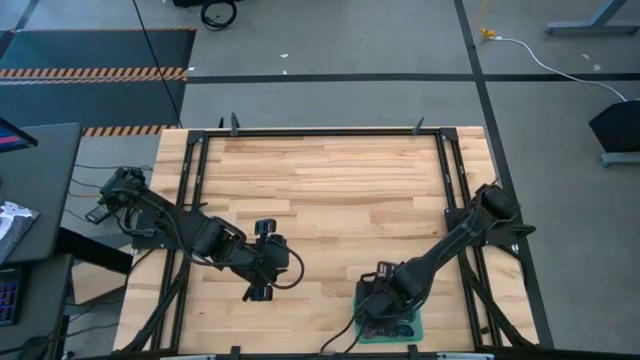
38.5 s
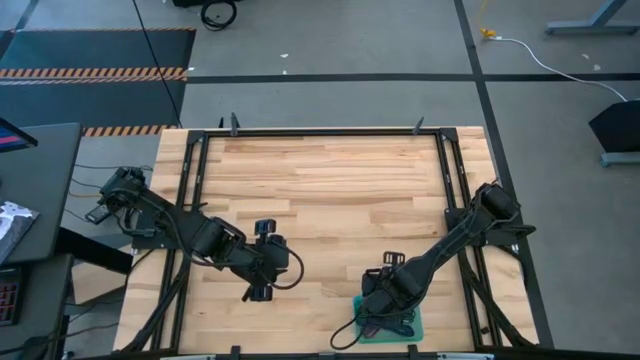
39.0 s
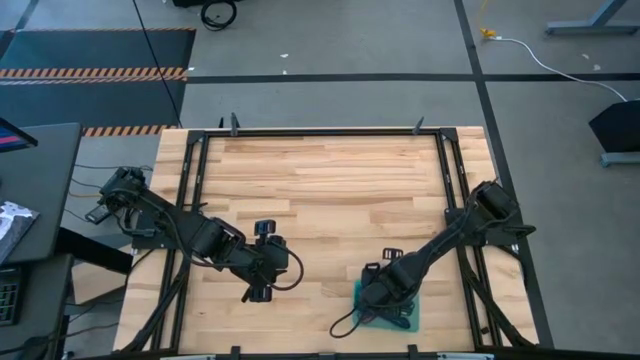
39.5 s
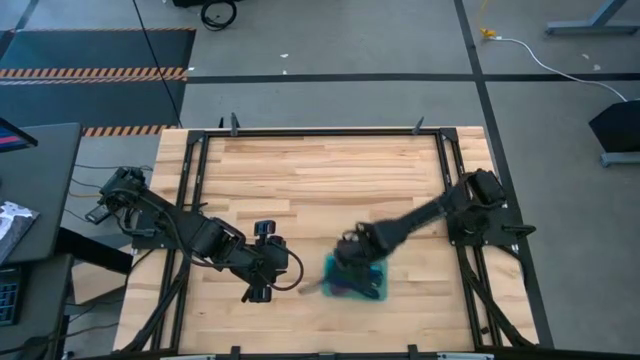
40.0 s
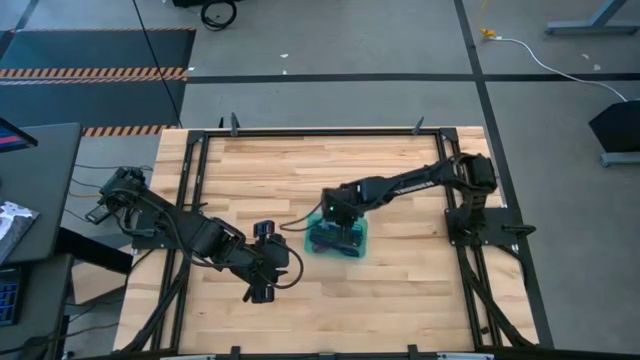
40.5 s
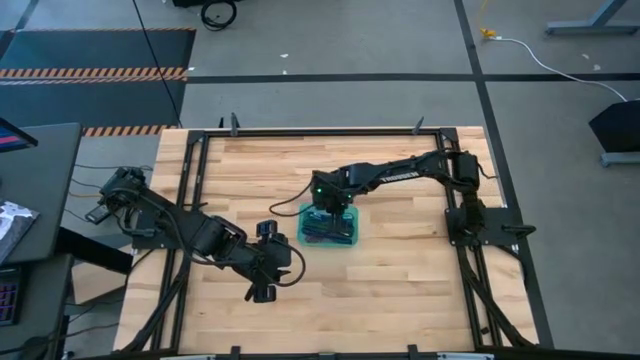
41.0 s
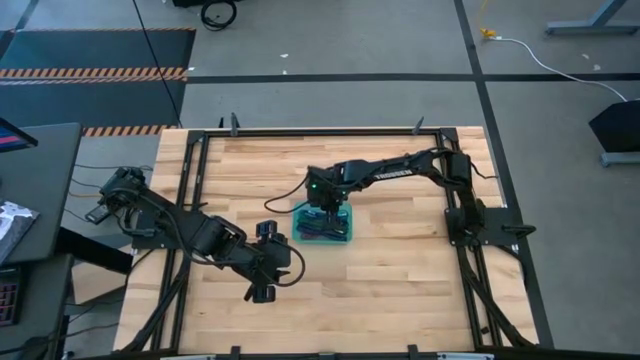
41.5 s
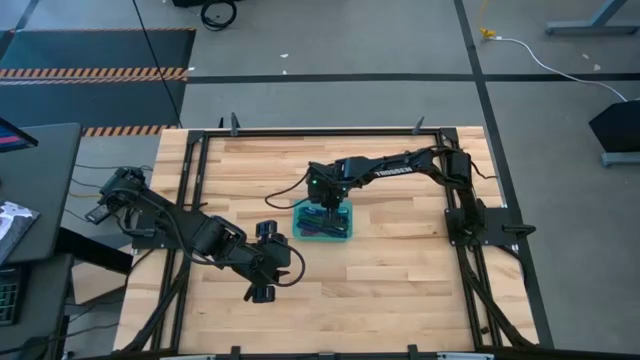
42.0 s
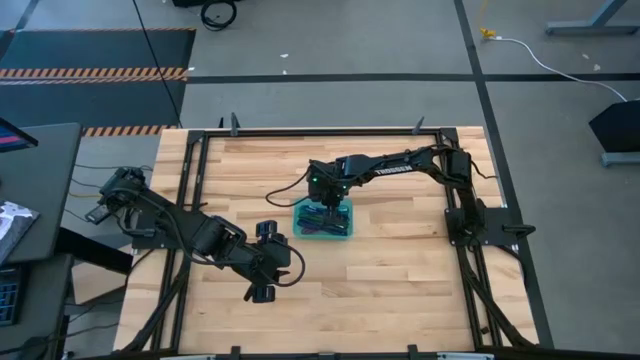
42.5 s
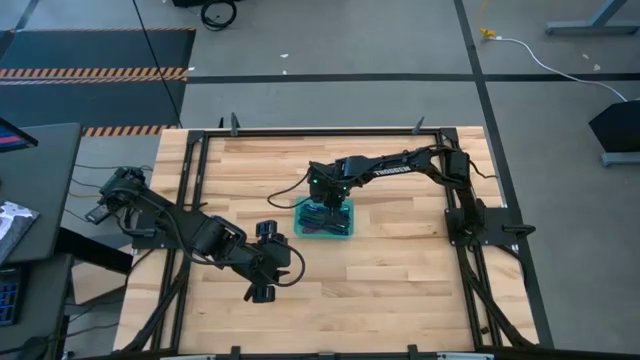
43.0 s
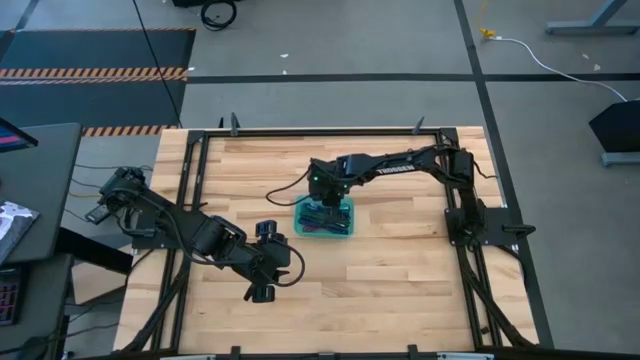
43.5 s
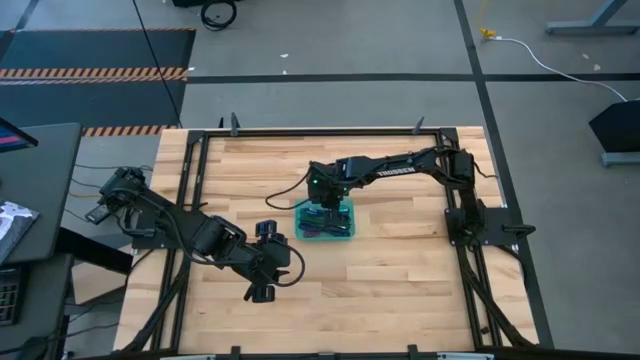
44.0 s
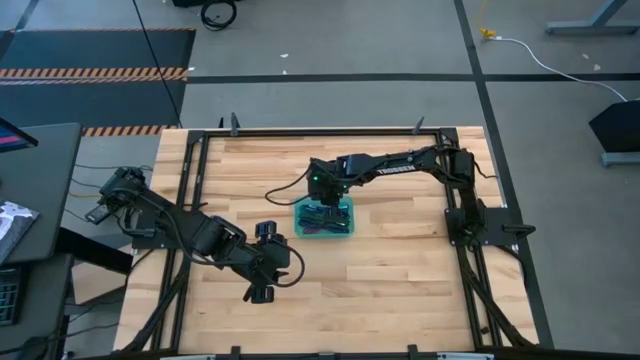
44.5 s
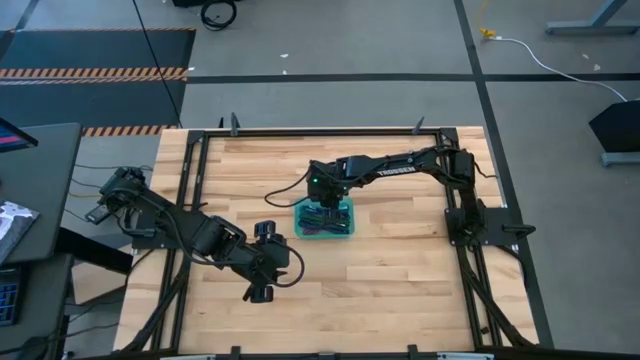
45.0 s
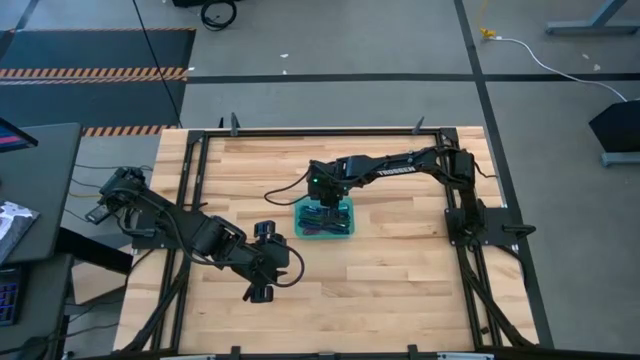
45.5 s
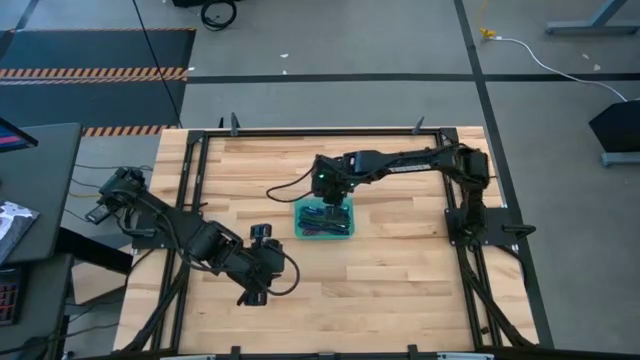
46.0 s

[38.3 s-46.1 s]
Task: Pick and place USB-C Cables
Move the blue transparent bin to the center of the table

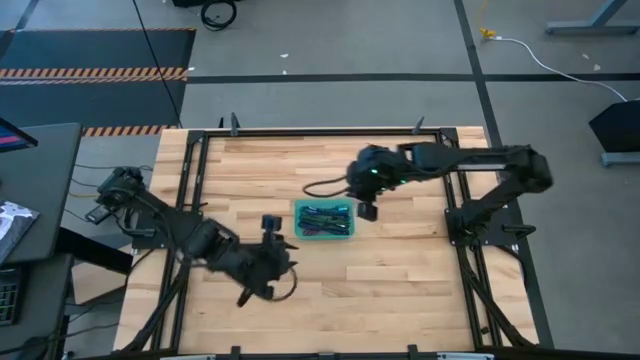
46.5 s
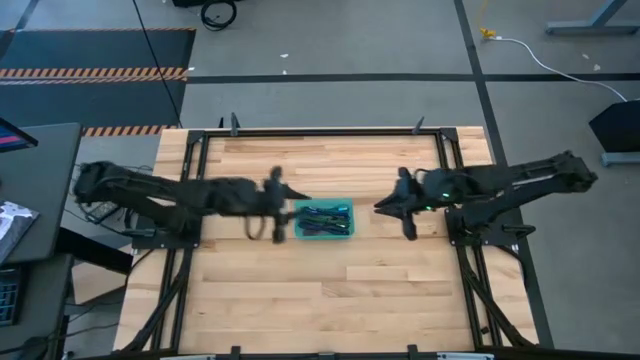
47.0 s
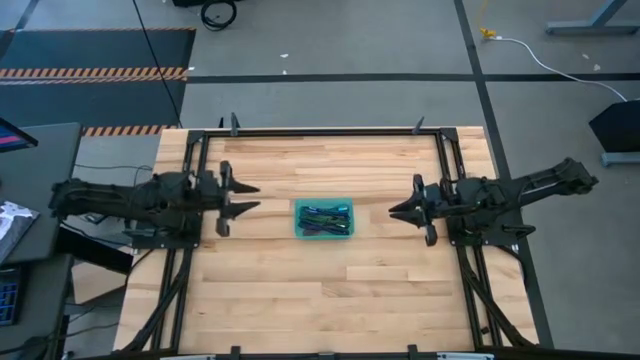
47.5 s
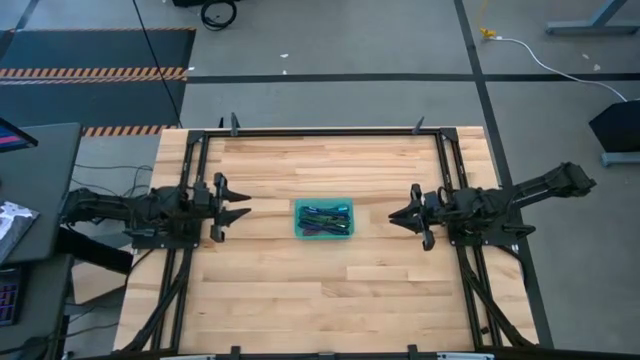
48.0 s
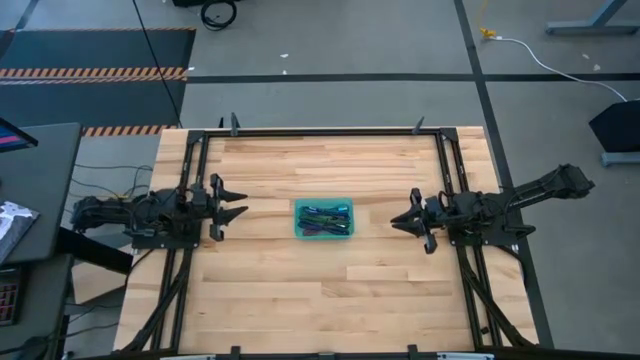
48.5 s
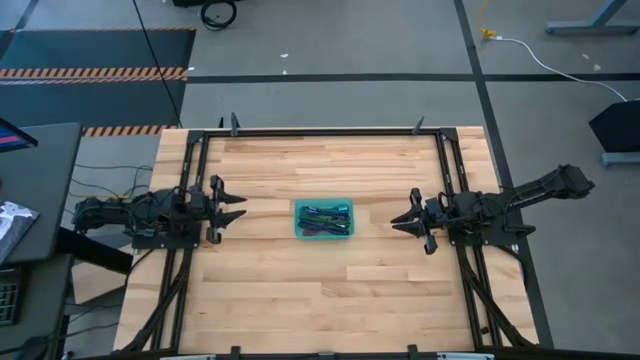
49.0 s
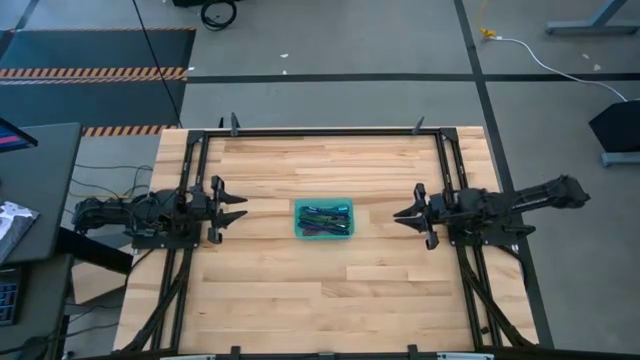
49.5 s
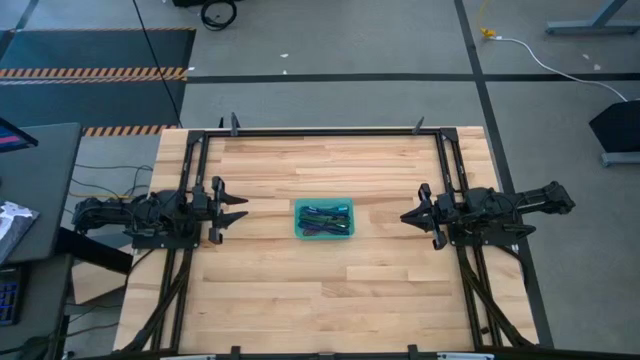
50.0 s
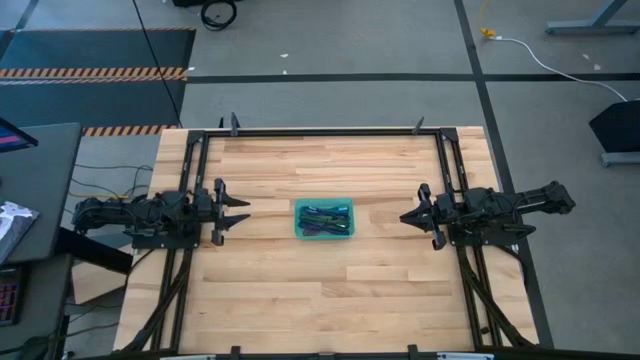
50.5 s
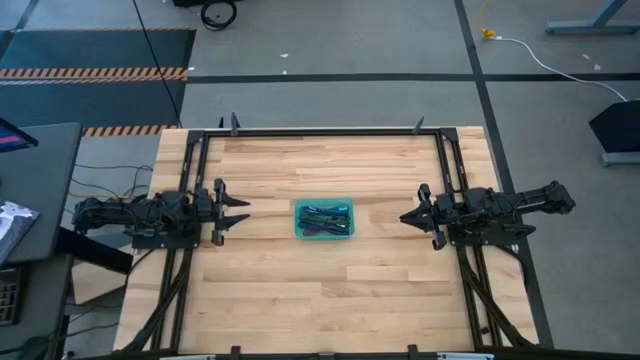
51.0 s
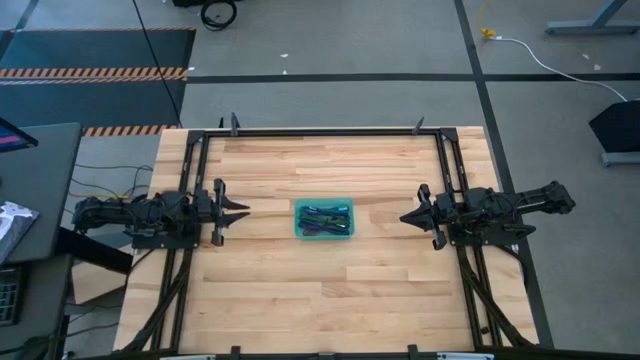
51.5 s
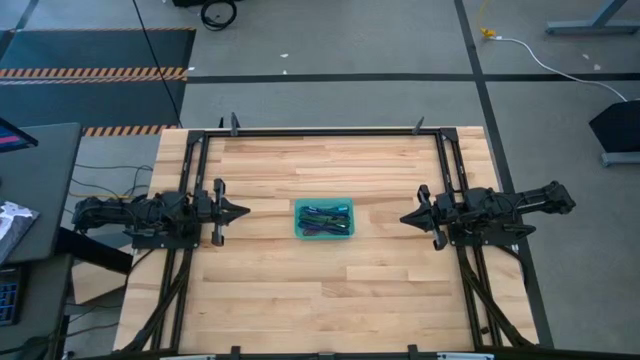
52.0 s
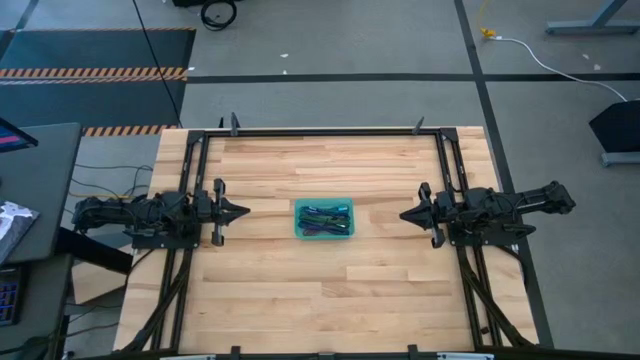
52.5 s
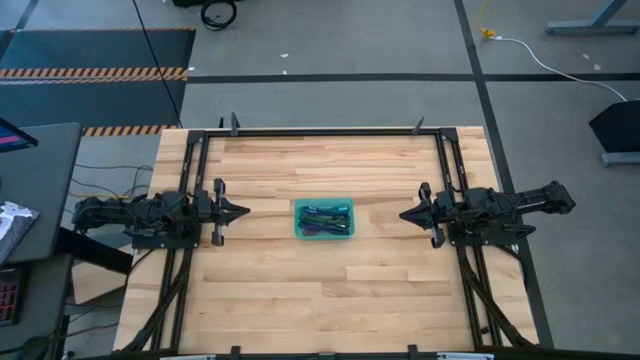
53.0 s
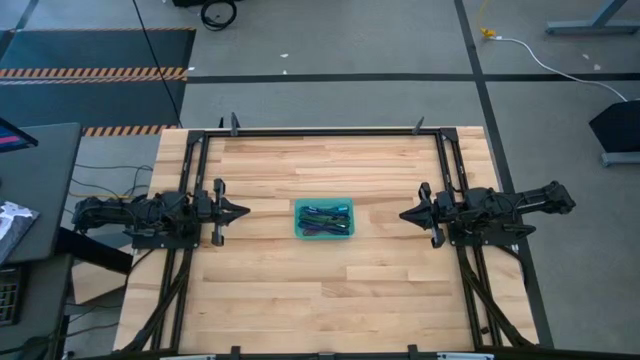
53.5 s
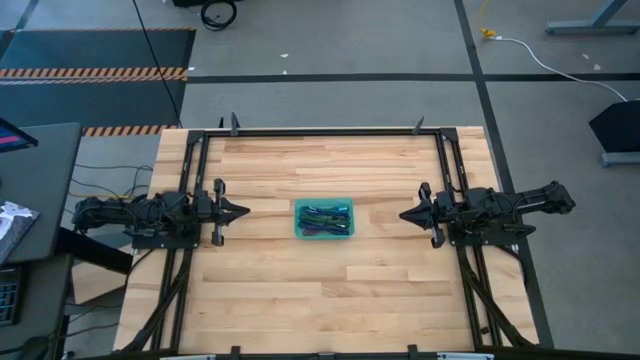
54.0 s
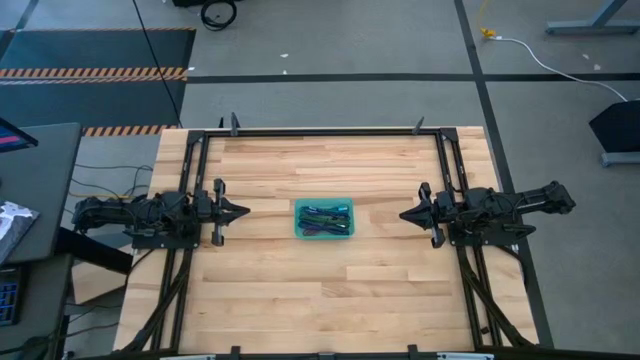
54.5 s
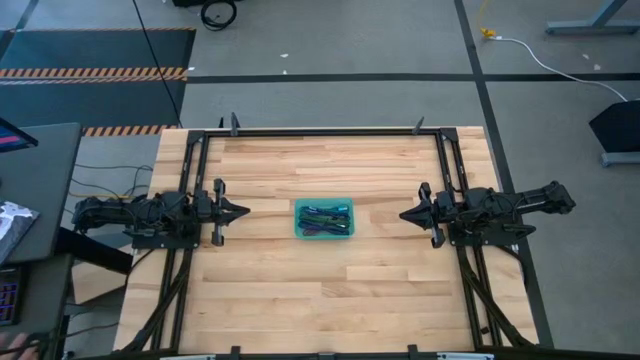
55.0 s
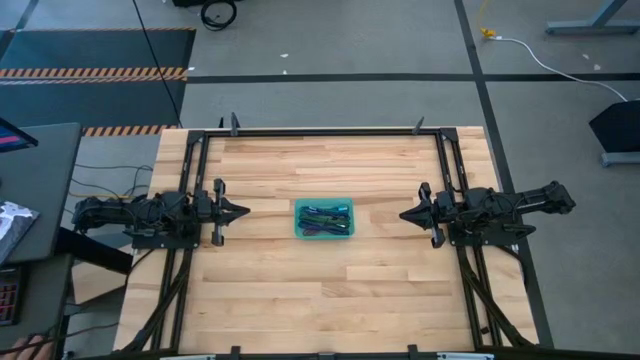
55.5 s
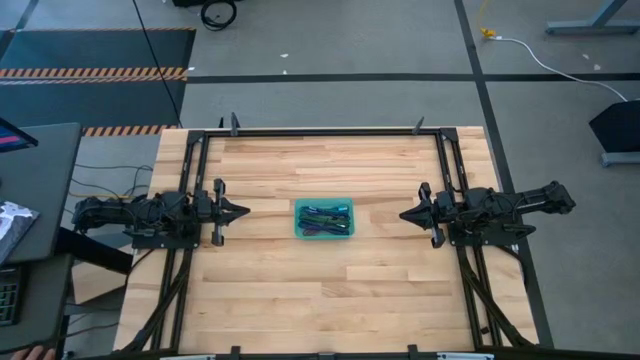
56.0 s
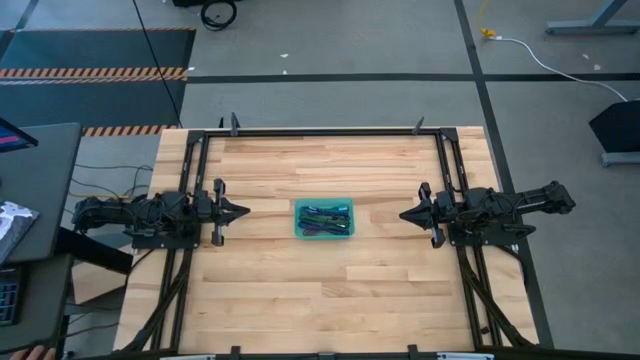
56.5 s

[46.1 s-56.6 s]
Return to Home Position

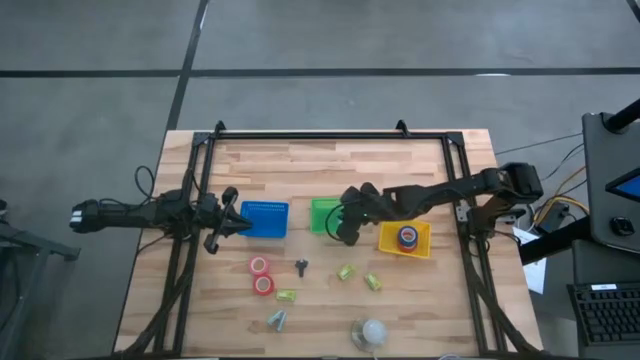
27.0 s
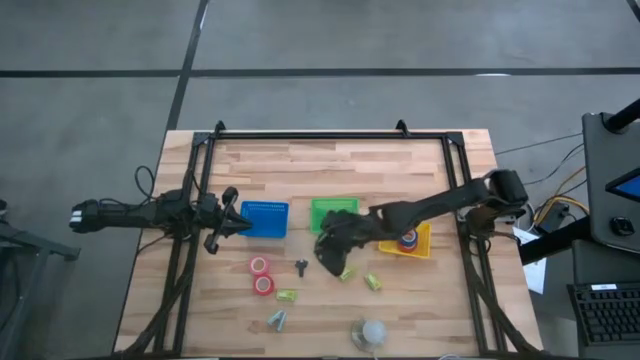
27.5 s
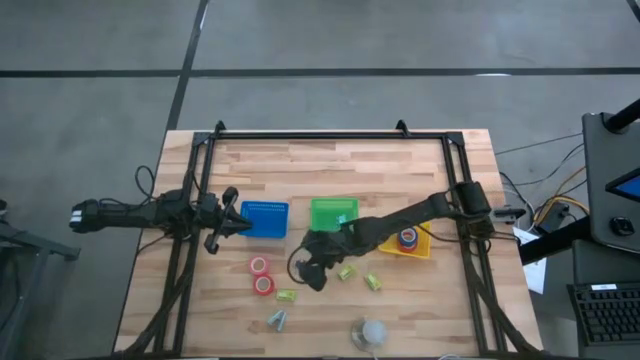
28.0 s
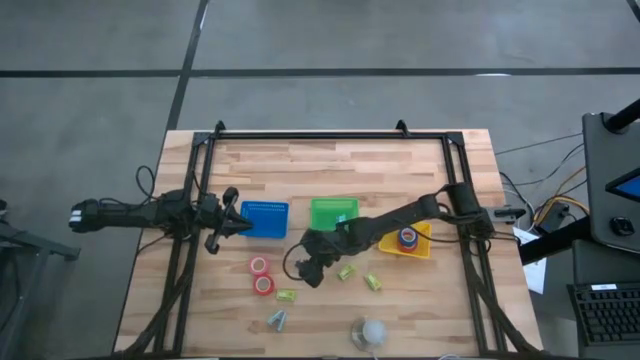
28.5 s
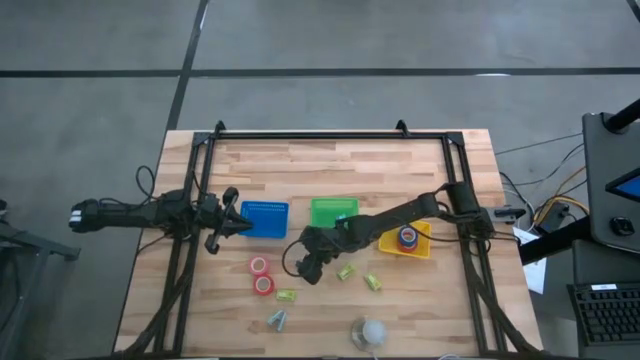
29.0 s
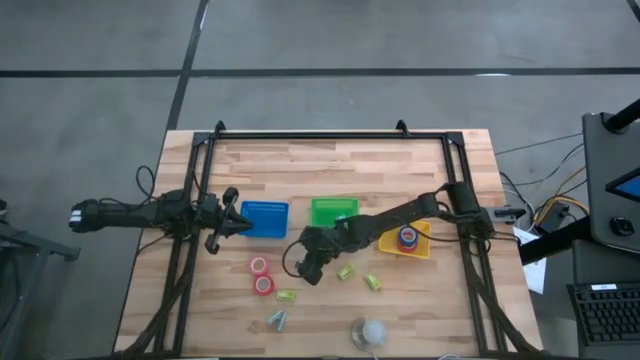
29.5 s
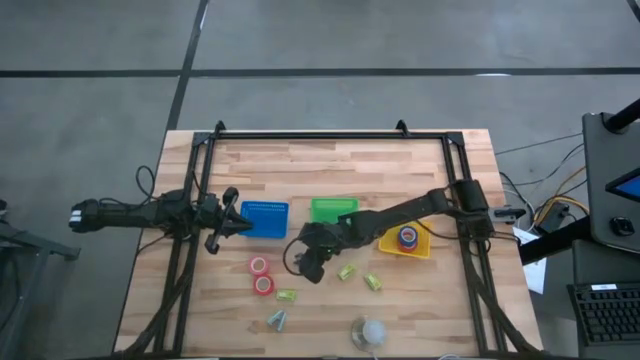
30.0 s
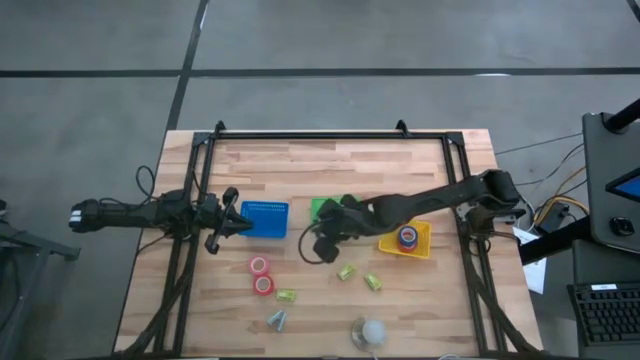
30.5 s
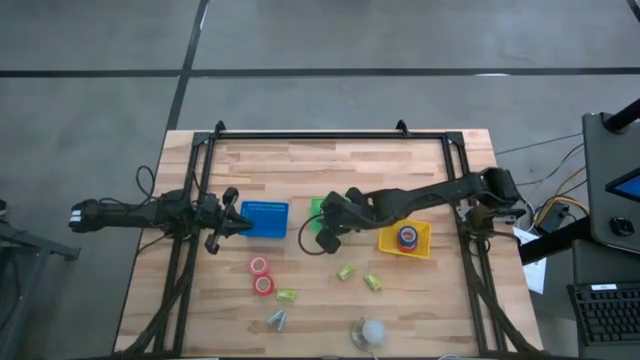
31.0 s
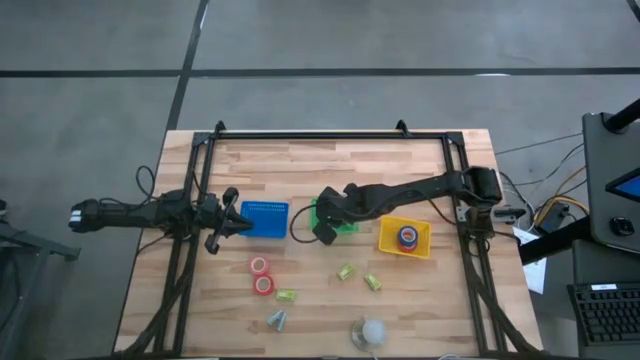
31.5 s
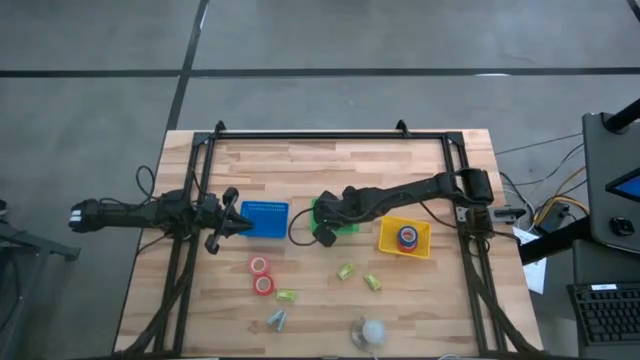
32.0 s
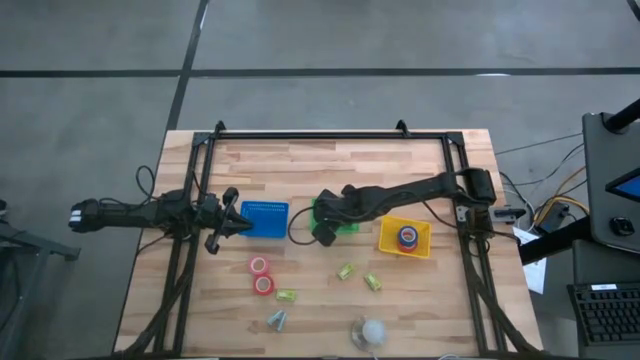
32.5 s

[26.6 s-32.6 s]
Task: Pick and place Stapler, Stapler remover, tape
Put the black staple remover into the green bin
